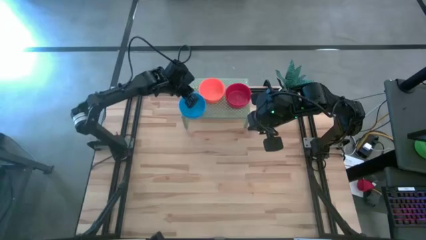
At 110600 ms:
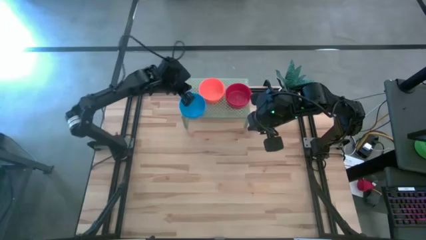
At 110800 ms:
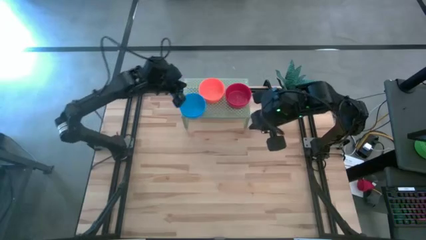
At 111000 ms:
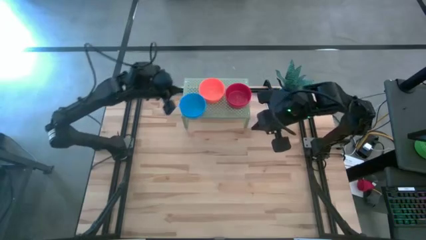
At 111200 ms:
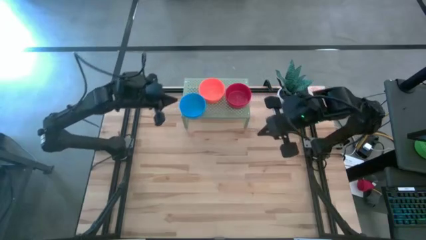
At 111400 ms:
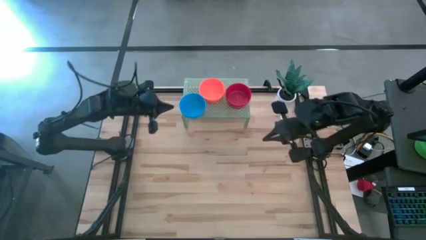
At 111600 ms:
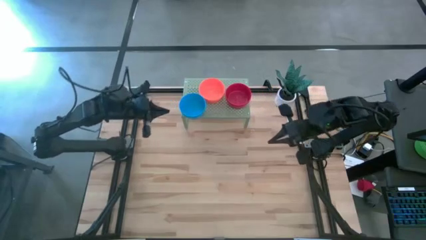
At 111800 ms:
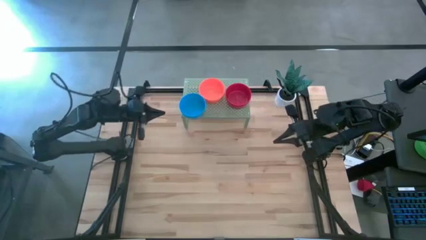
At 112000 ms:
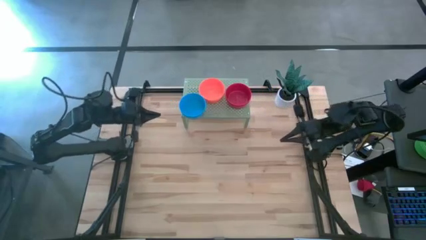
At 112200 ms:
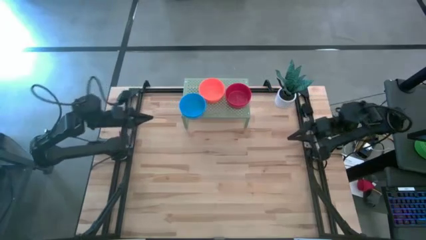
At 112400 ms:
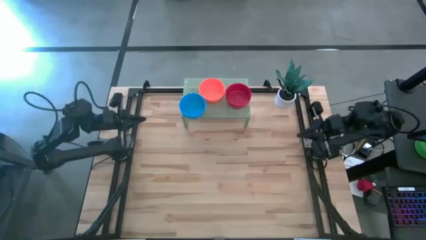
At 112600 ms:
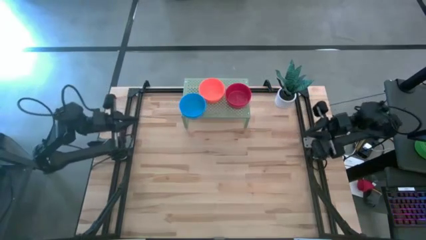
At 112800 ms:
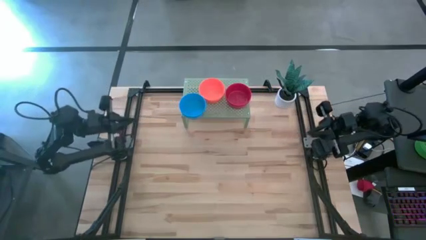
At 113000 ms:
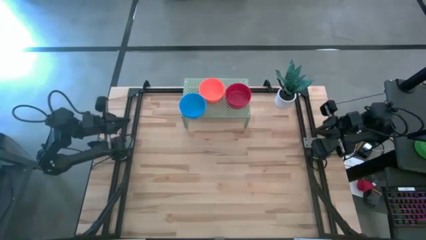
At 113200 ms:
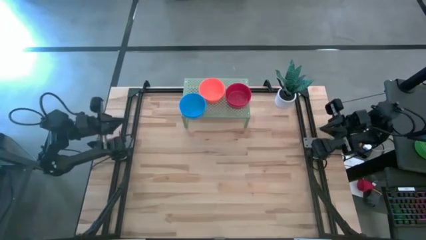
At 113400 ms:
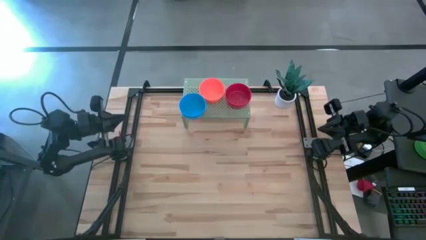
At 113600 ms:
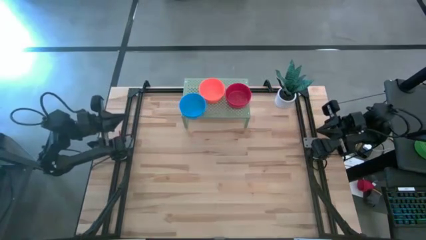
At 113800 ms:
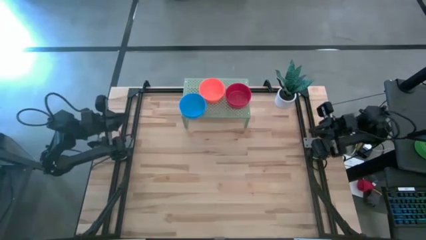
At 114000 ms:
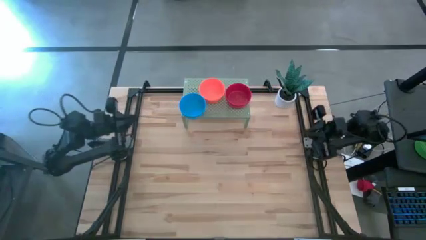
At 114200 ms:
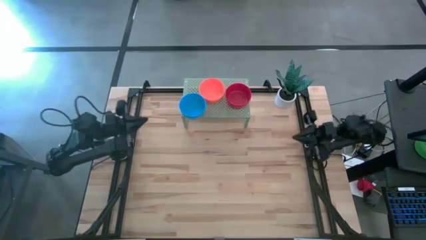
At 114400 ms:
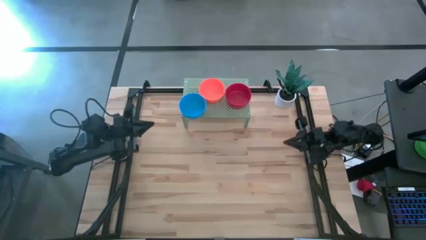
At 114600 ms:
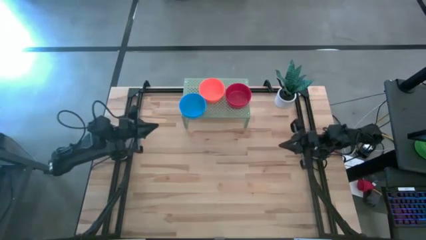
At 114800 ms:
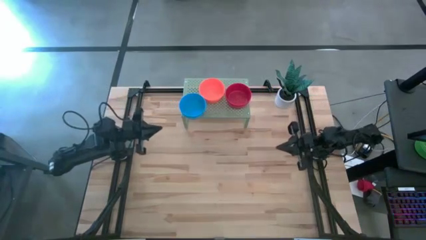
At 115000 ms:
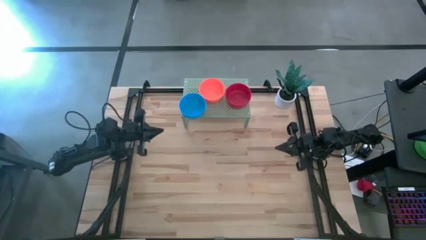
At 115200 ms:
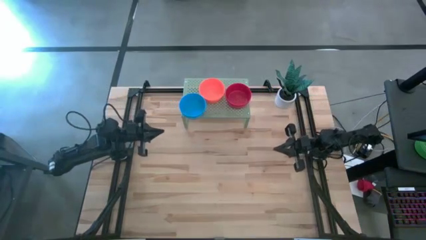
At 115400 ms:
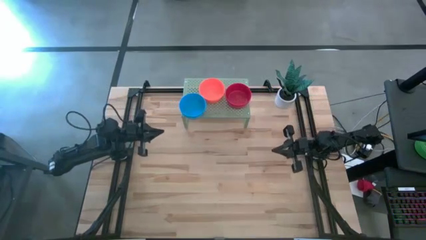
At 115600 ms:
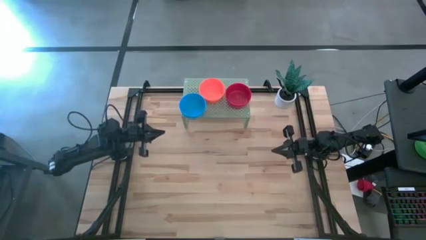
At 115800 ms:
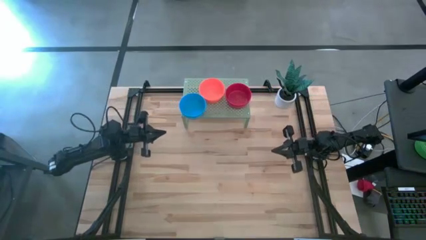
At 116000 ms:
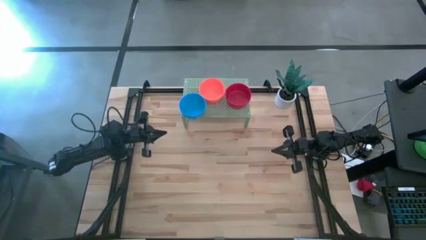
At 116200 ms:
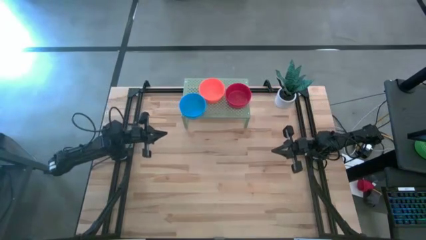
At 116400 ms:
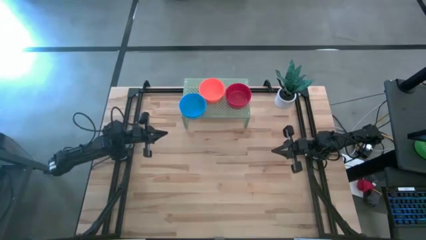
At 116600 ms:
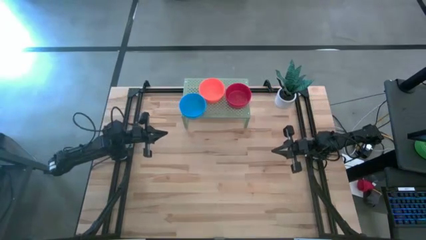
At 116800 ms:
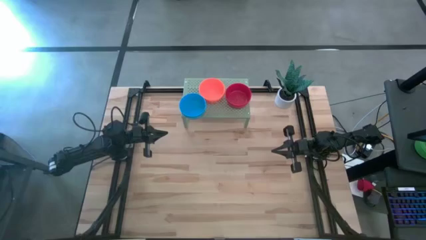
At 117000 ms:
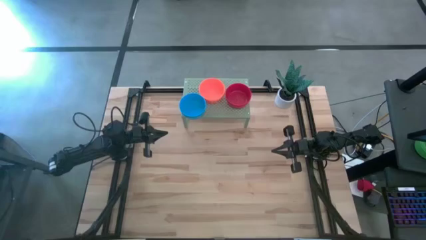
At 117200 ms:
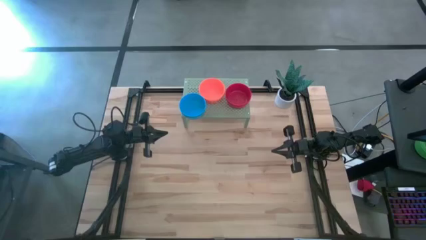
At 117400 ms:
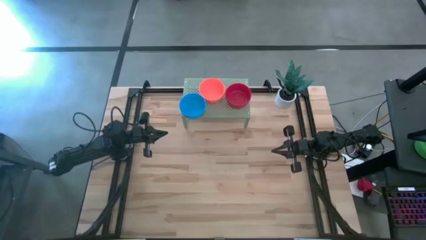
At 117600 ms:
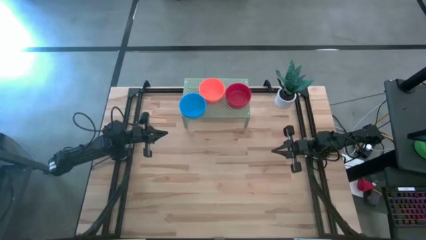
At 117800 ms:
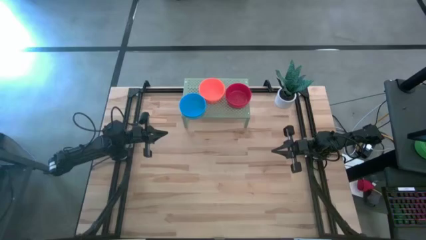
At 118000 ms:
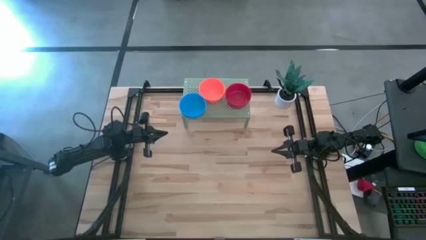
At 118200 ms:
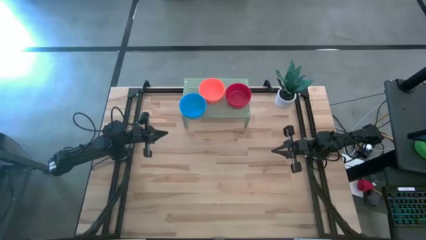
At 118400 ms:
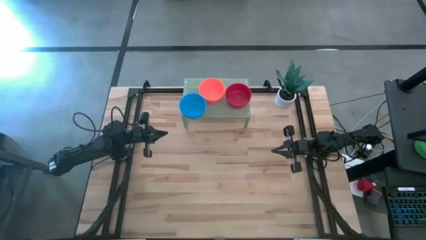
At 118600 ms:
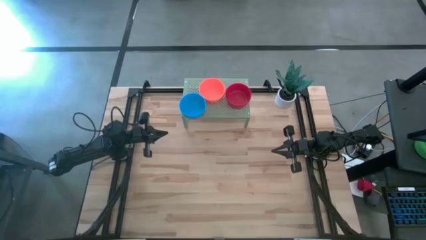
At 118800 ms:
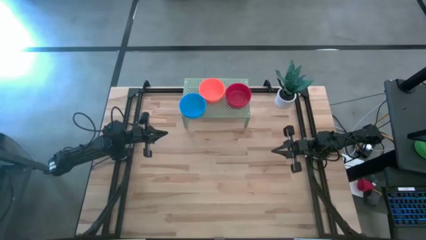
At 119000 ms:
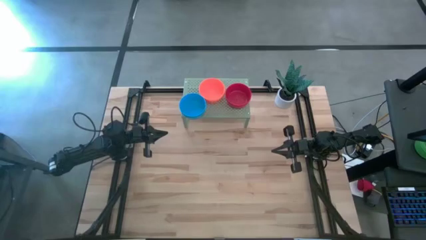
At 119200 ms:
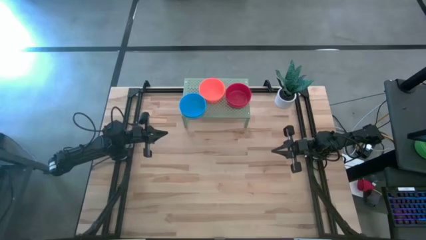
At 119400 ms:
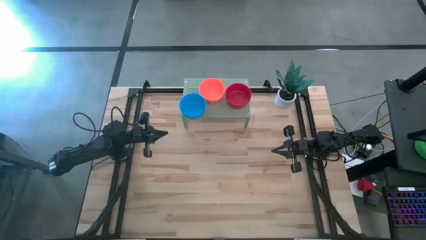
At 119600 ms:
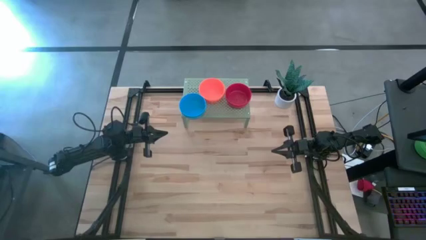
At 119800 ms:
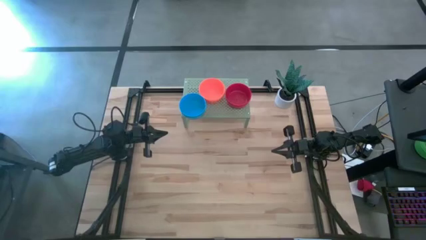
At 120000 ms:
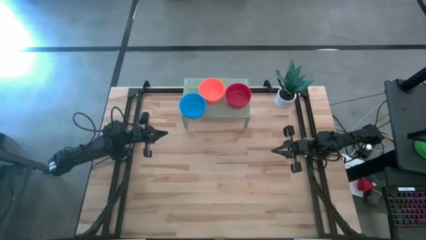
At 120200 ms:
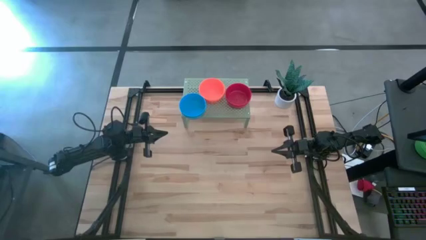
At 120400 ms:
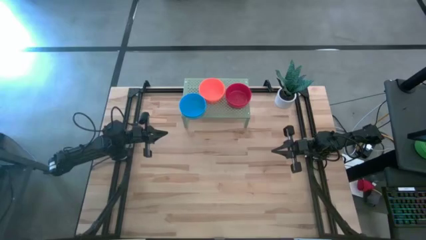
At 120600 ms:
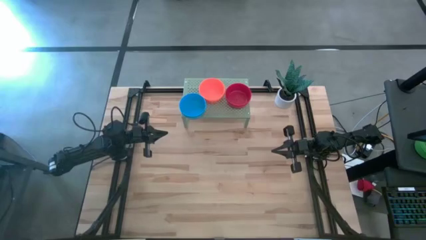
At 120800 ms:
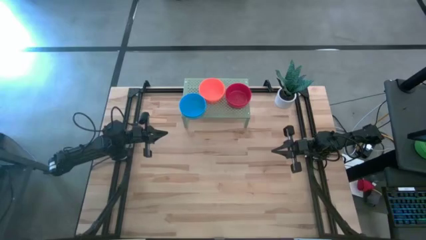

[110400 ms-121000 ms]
Task: Pick & Place Mini bowls
Return to Home Position

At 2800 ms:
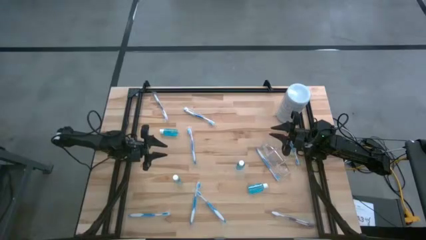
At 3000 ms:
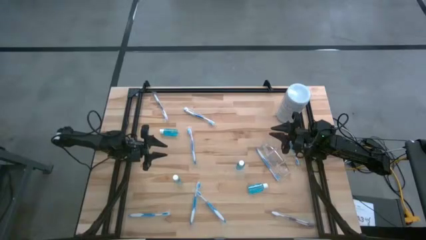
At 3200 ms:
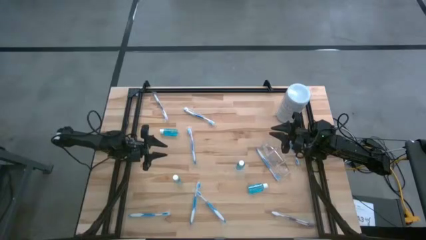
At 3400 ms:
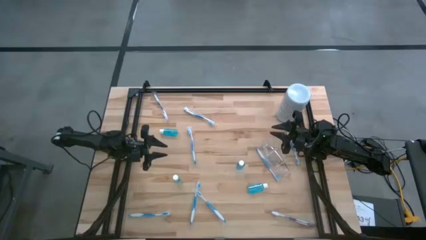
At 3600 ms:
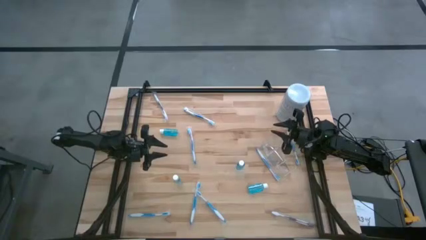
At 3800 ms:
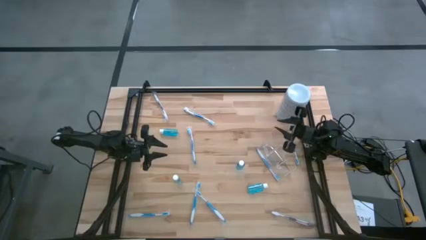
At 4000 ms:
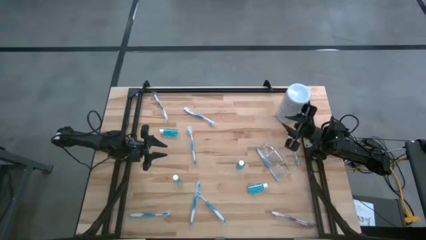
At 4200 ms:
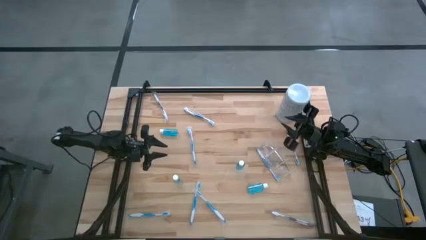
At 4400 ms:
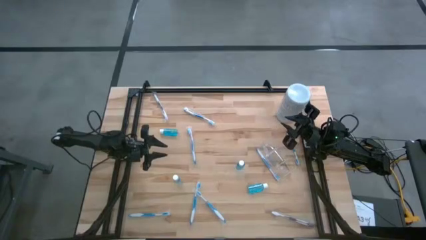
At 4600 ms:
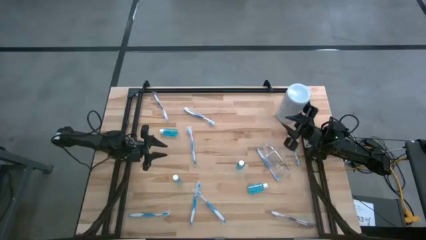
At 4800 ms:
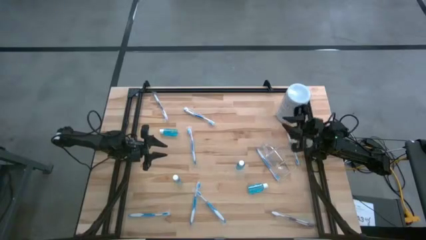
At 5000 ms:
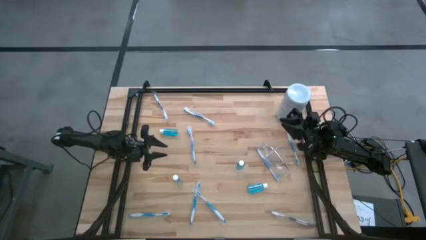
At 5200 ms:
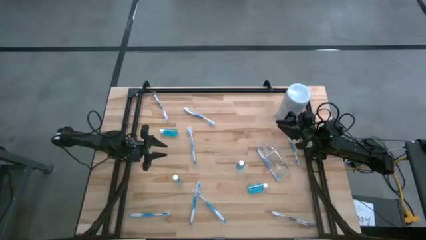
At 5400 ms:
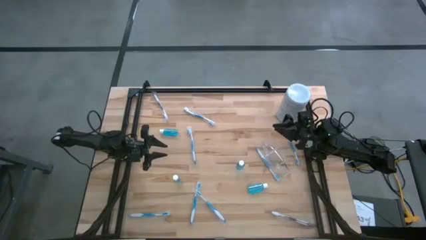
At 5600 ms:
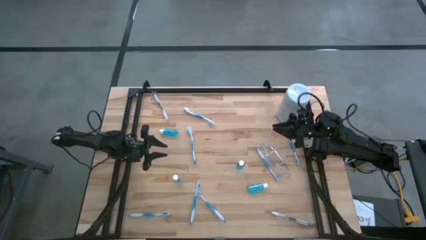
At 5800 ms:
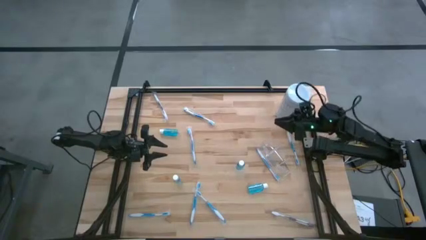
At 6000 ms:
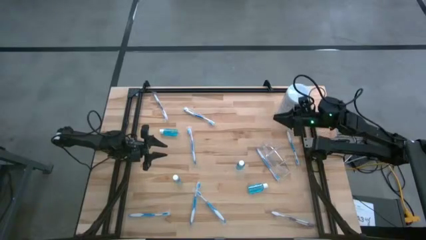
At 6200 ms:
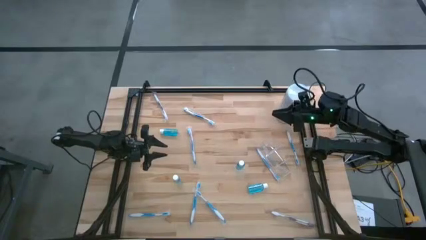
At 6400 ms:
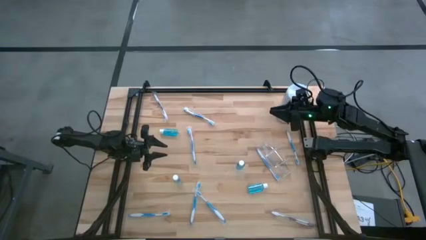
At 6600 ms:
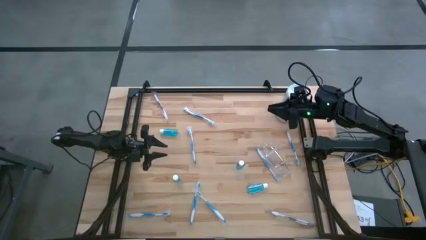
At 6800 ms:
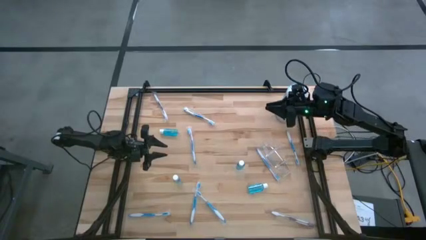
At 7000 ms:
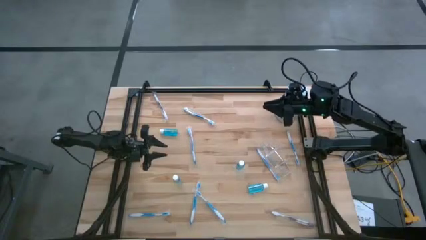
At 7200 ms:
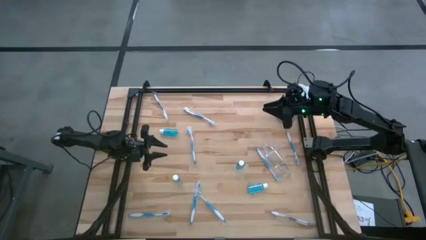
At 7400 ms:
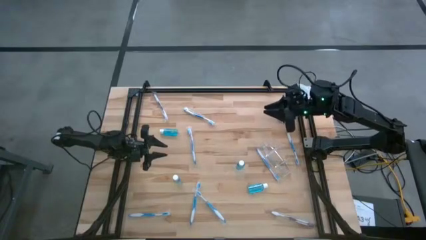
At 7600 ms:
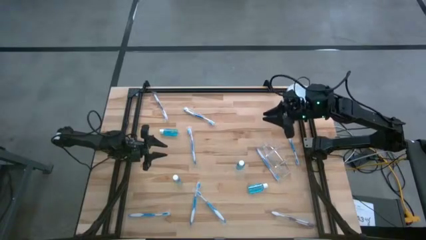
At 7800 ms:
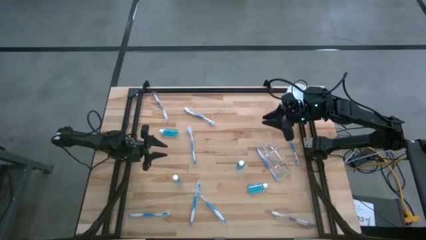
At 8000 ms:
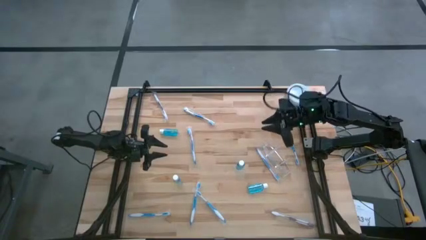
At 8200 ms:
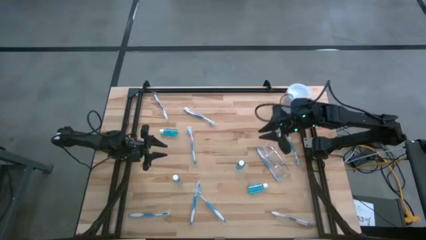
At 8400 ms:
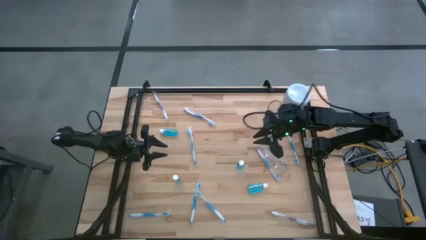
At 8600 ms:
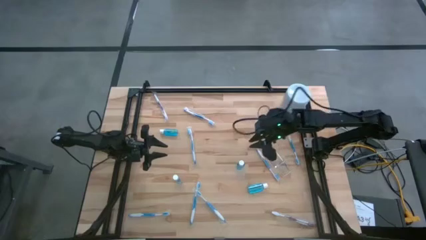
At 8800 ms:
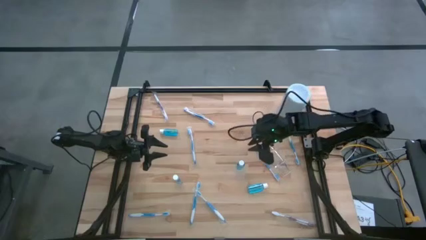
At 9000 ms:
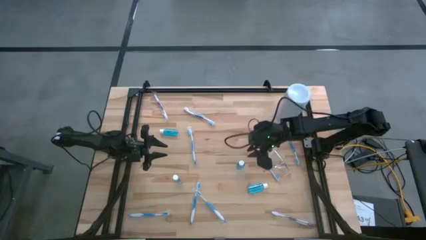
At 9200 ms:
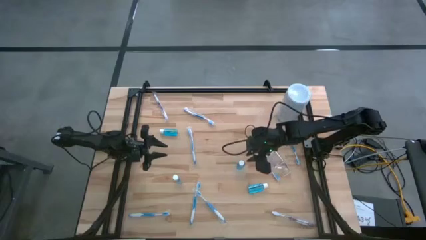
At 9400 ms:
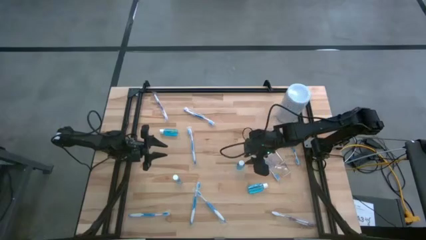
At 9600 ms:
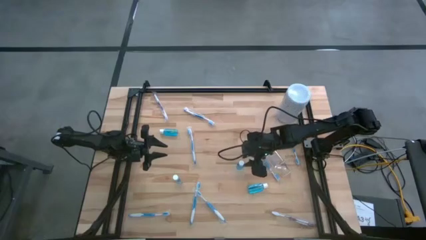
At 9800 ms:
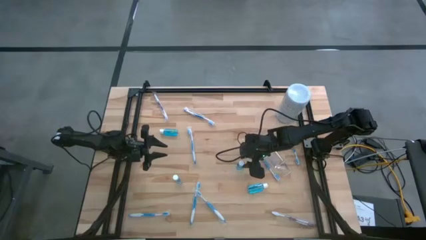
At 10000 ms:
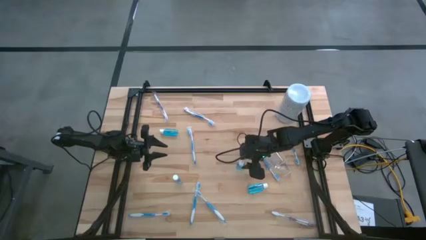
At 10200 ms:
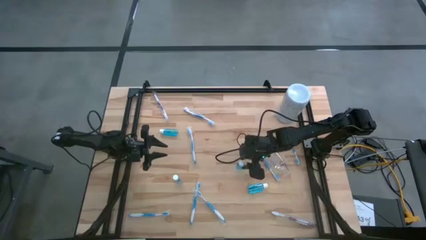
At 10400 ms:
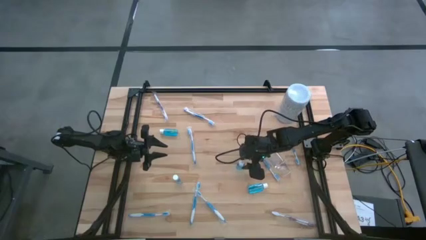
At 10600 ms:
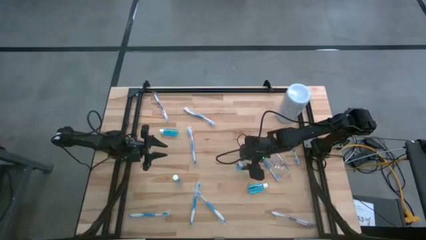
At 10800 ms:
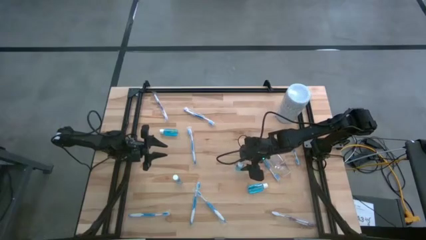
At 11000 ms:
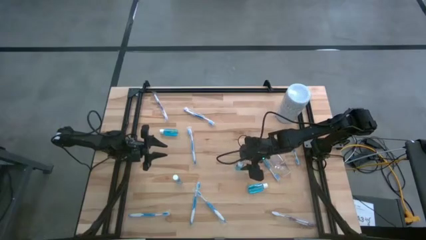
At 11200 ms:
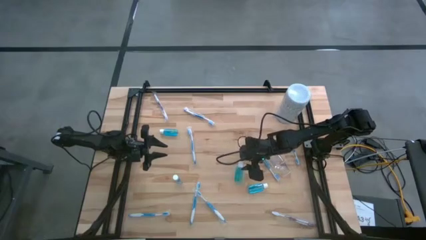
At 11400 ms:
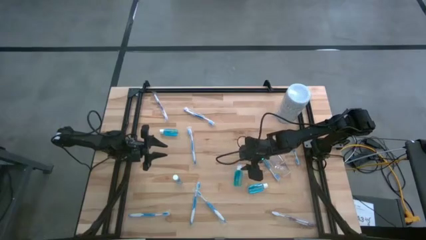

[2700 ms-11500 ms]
Task: Pick & Place toothbrushing station
Put the blue mouthwash into the middle section of the transparent organizer
